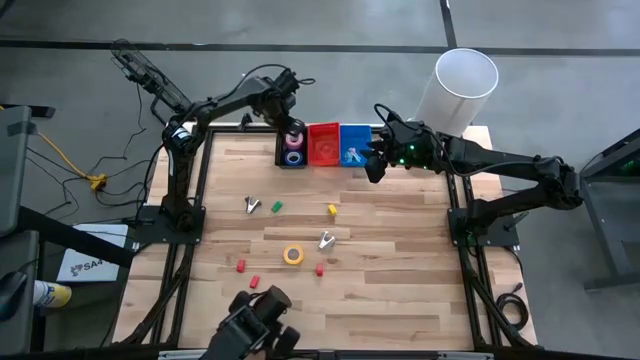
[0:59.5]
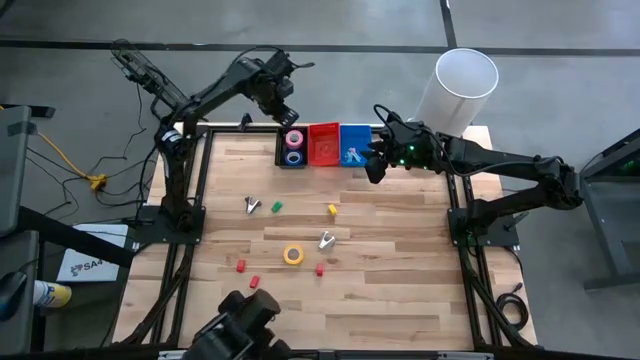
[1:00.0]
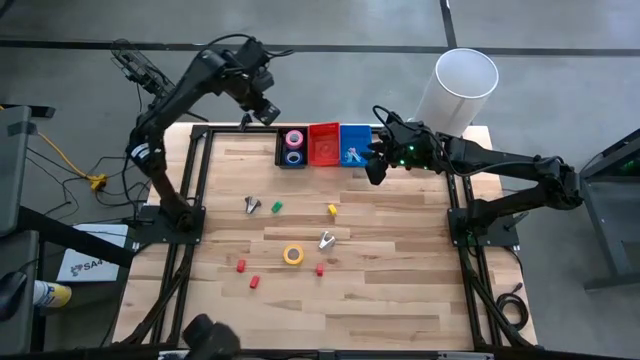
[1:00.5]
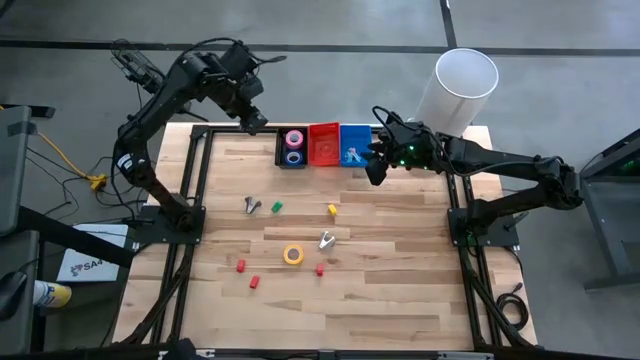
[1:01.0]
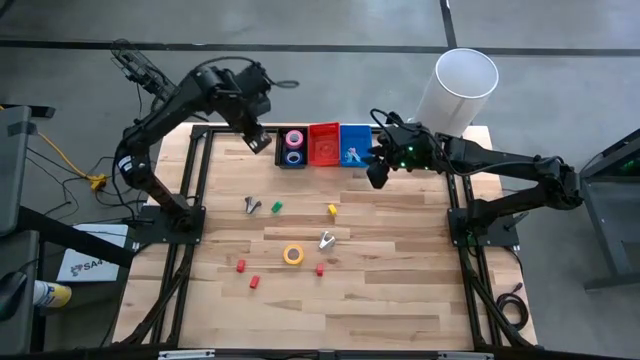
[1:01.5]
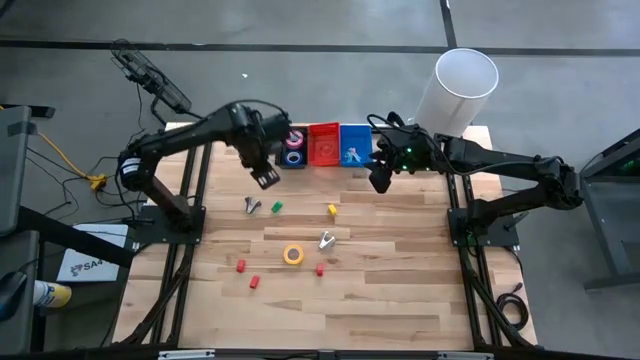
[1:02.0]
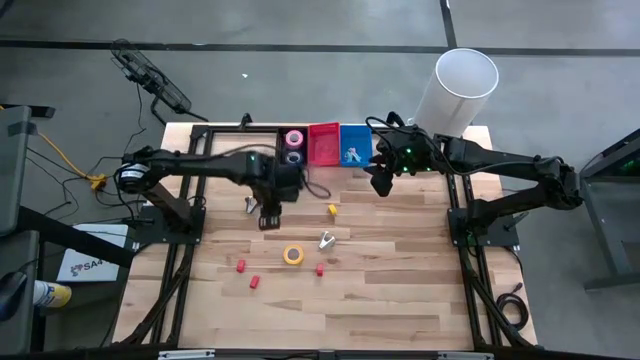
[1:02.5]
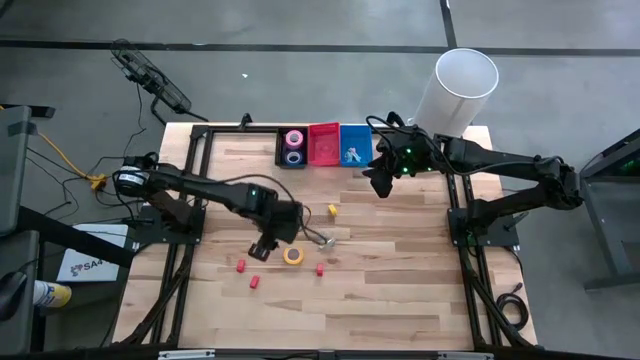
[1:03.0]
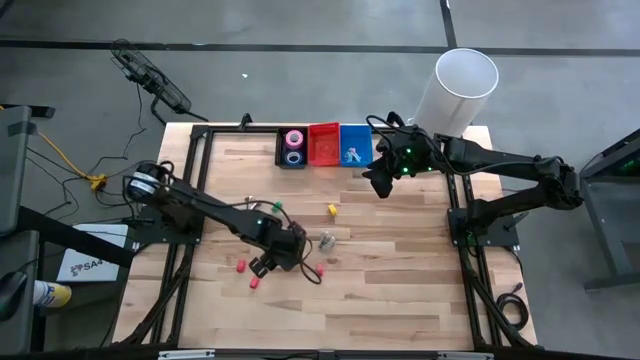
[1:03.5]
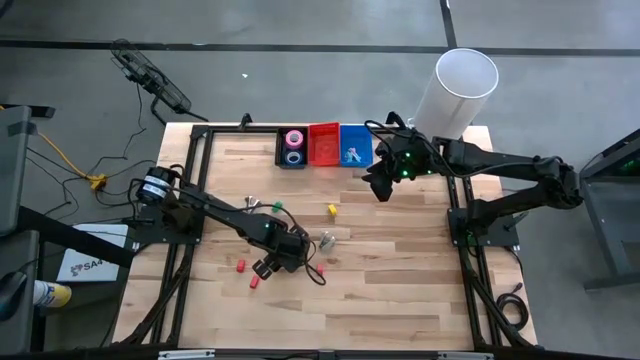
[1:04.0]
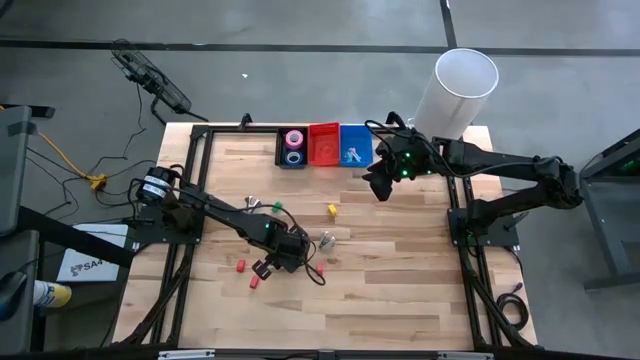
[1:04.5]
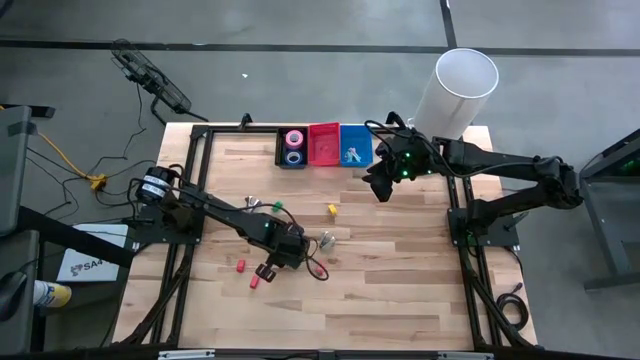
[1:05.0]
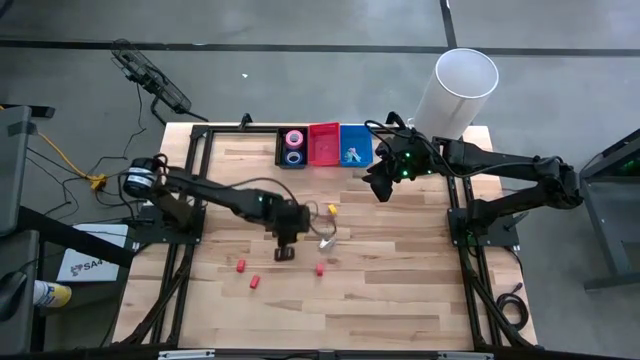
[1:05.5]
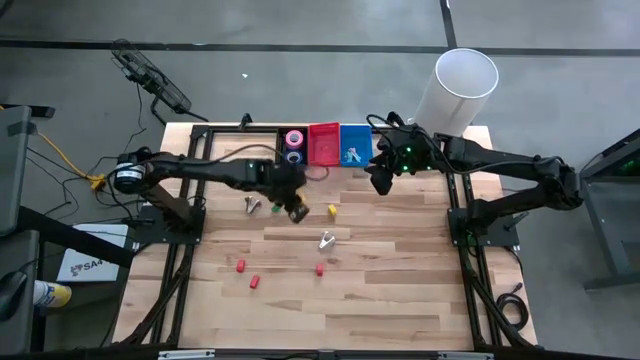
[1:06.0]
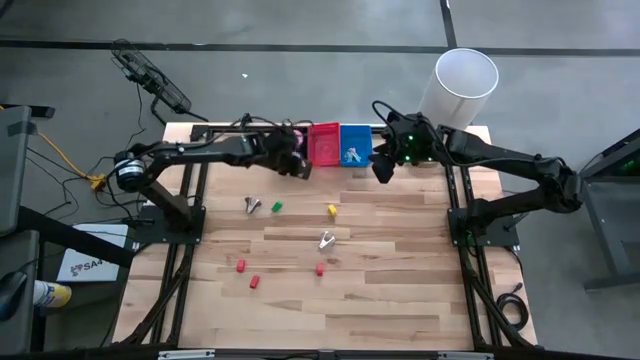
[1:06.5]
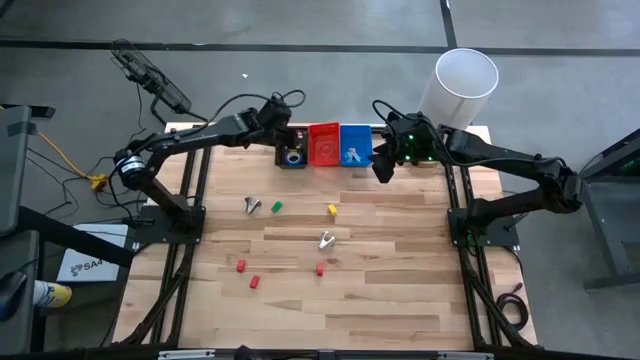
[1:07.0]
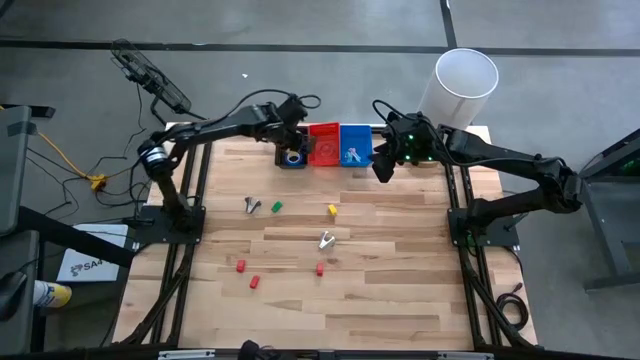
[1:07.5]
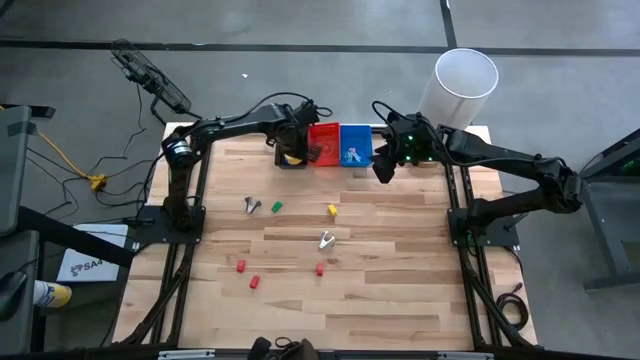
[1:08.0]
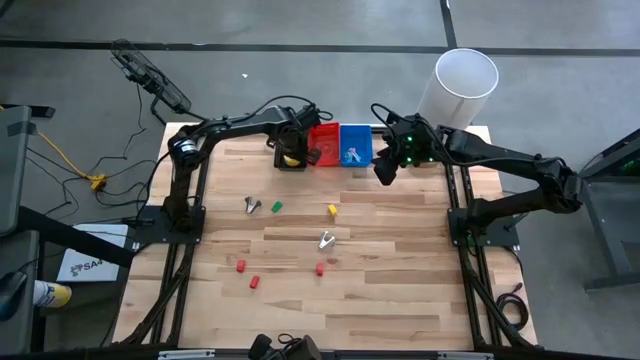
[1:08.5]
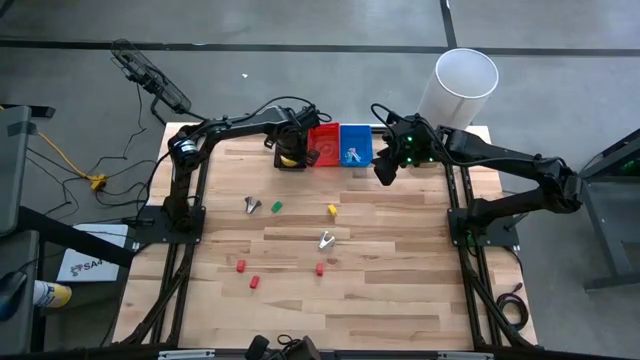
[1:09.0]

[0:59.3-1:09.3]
Task: Pick and place Stapler, Stapler remover, tape
Put the yellow tape into the black bin

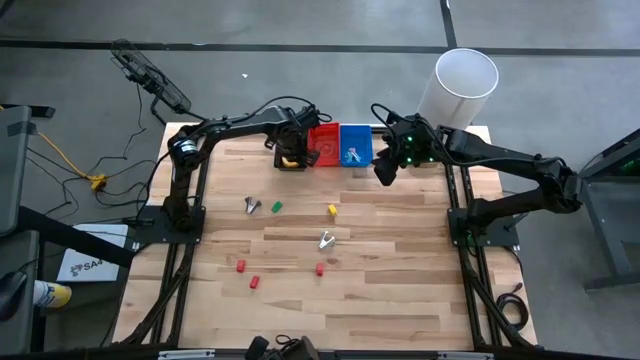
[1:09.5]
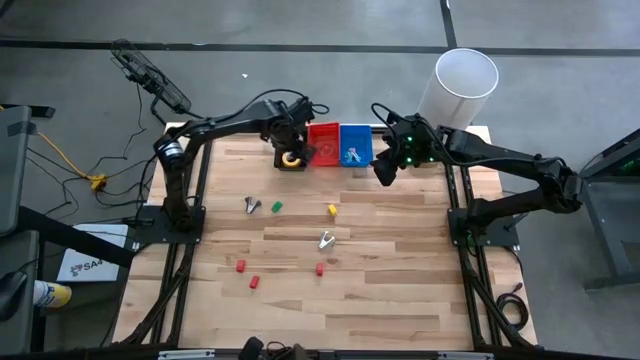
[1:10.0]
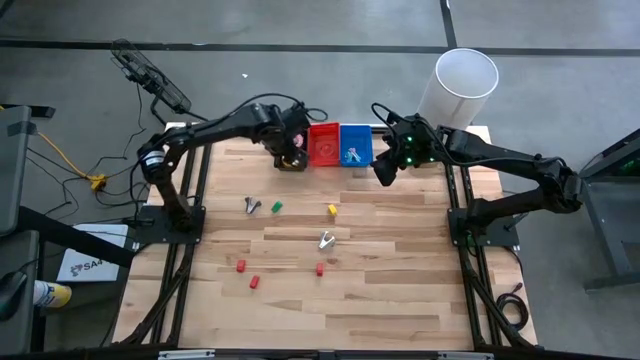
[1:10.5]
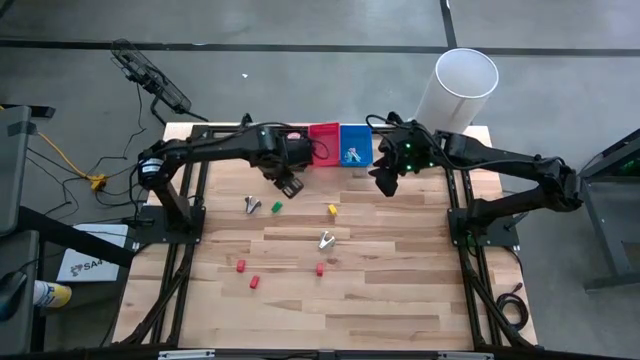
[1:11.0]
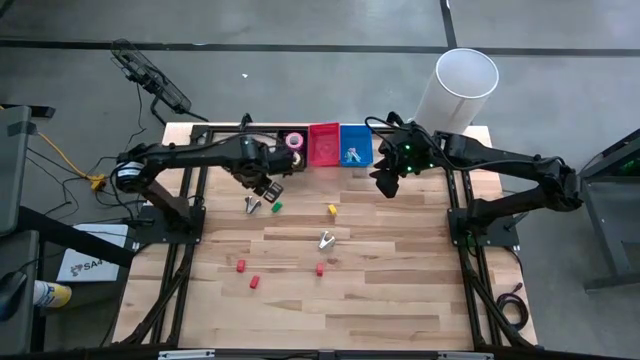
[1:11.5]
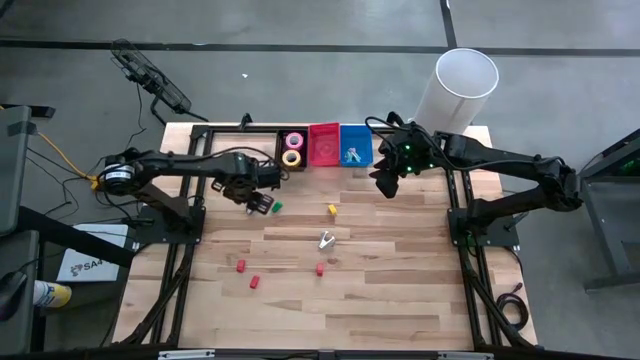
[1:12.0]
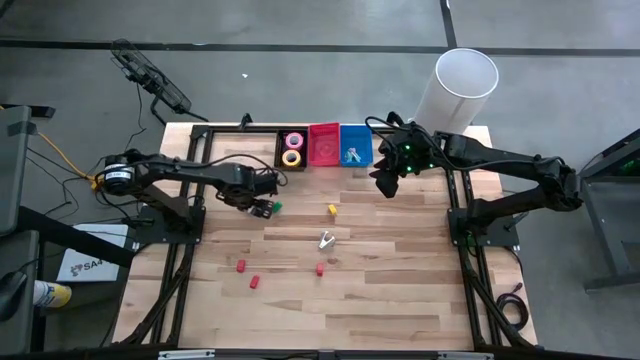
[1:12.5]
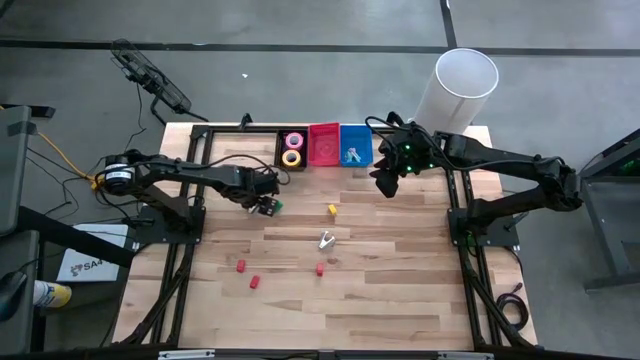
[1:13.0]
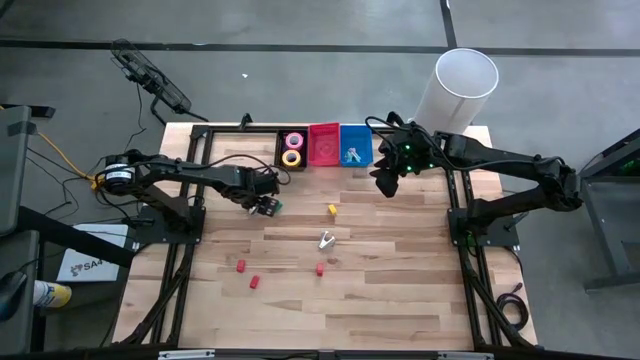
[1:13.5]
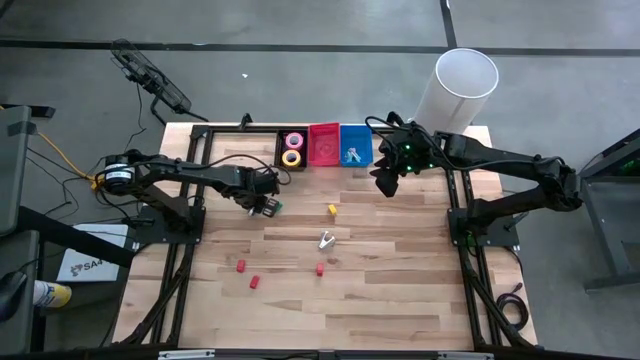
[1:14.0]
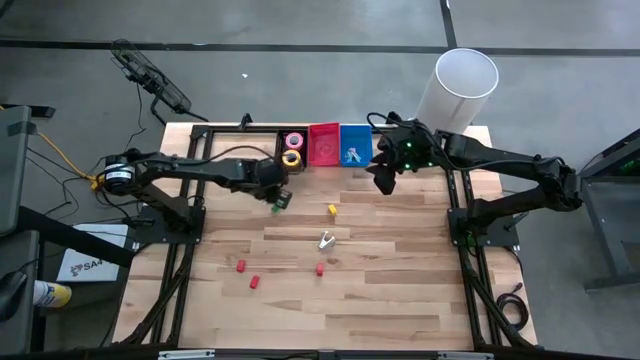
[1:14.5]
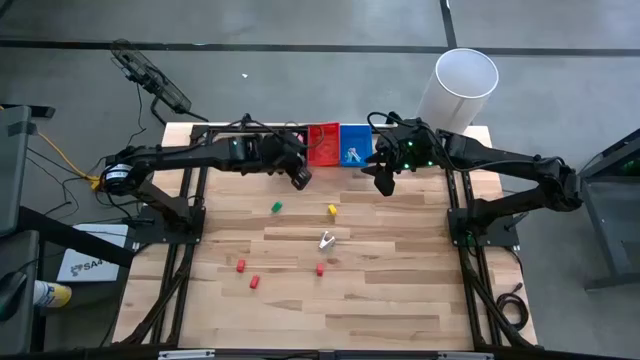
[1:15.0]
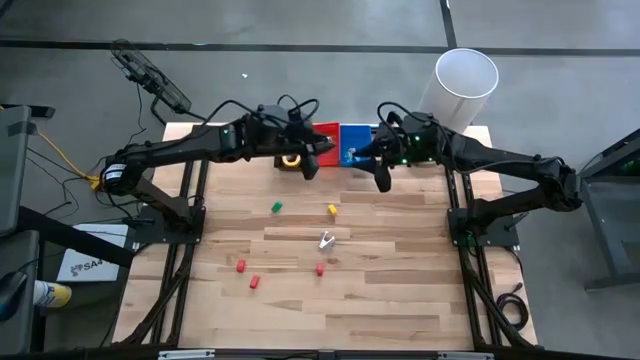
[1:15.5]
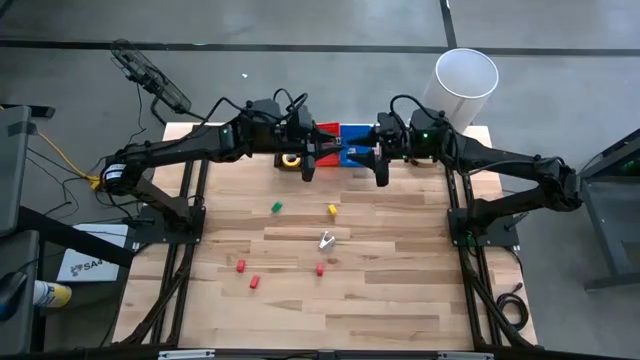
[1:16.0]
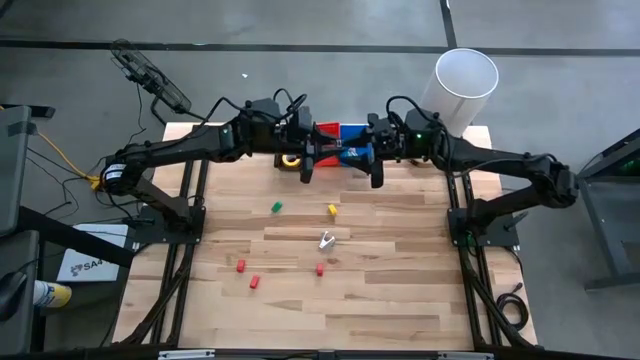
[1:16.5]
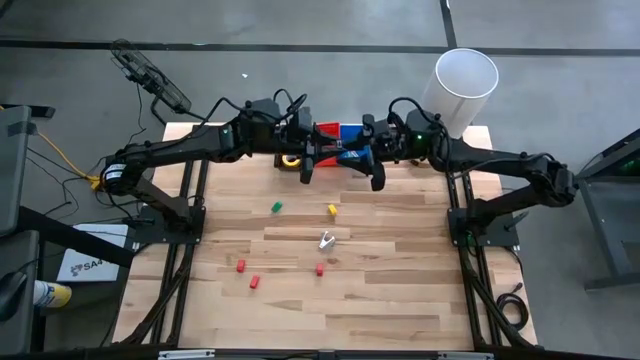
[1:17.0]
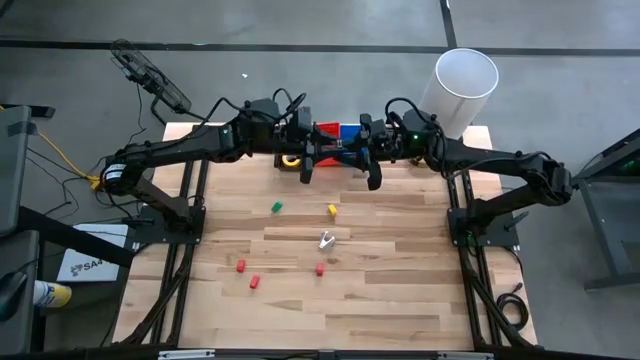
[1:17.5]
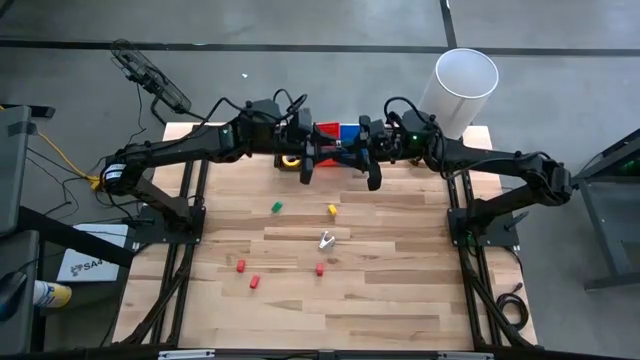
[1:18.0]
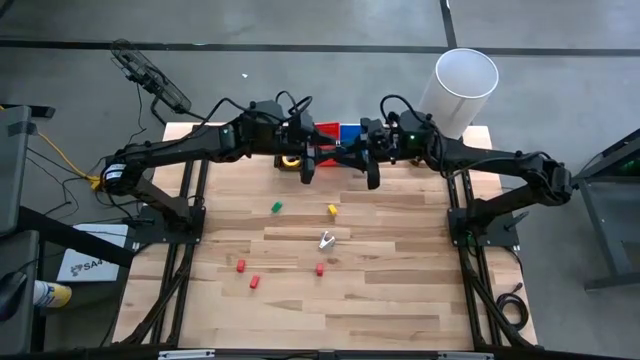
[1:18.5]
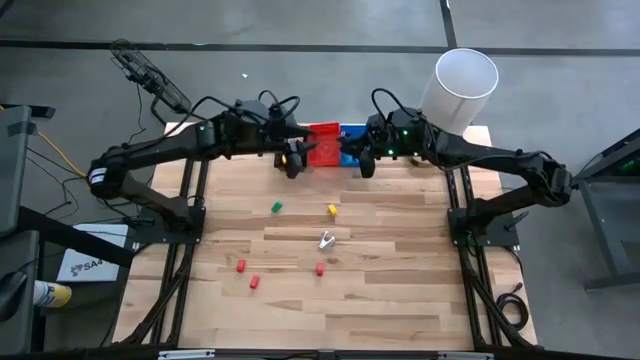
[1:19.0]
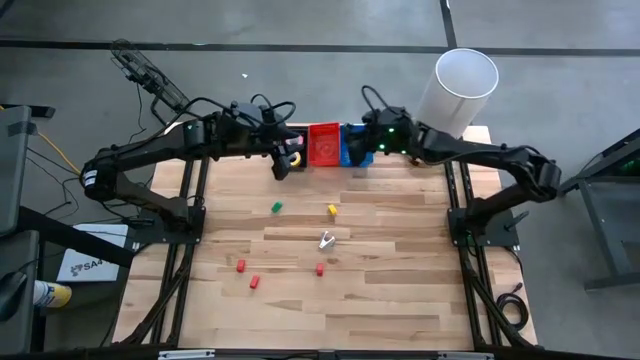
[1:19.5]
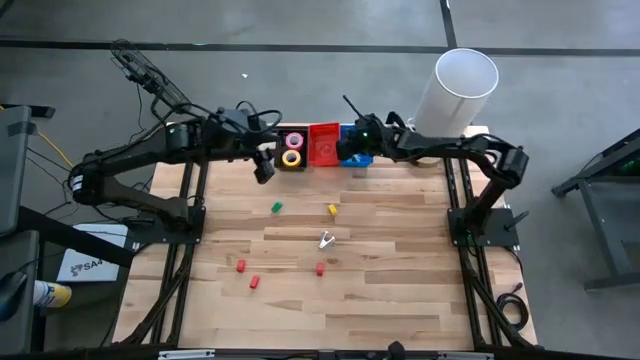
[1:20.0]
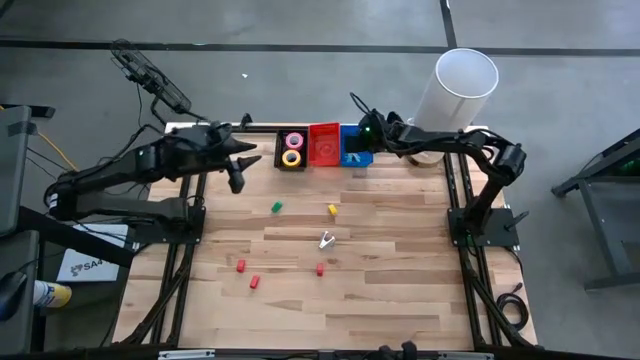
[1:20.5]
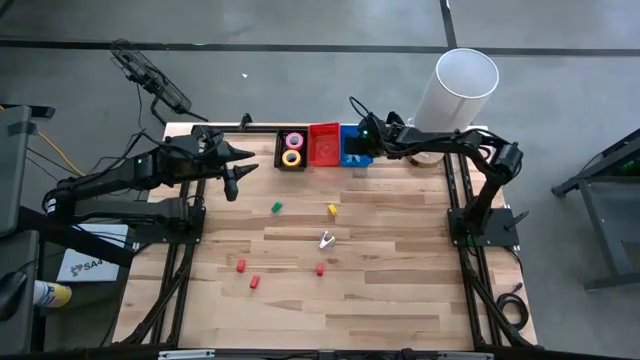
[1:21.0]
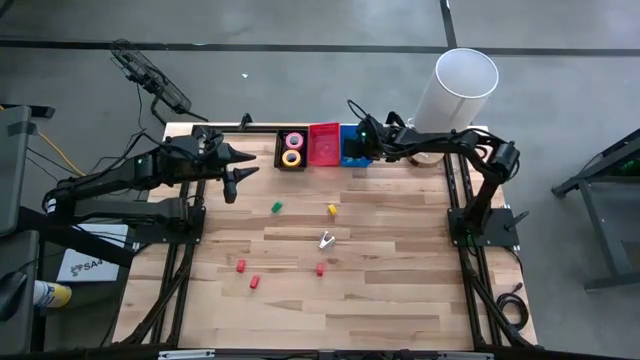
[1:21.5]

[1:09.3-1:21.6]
Put the black staple remover into the blue bin
